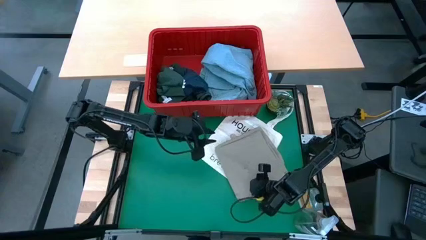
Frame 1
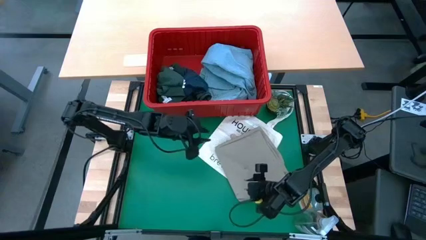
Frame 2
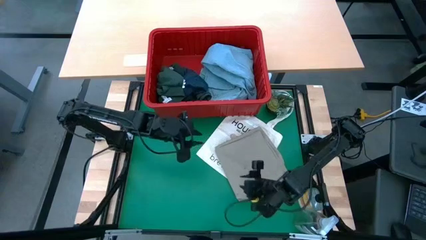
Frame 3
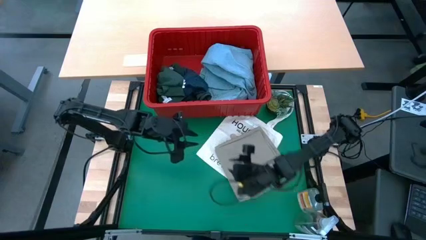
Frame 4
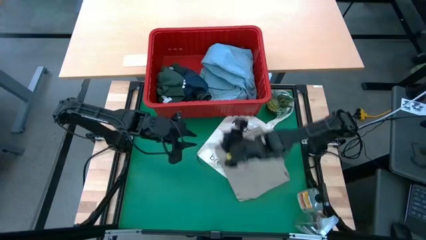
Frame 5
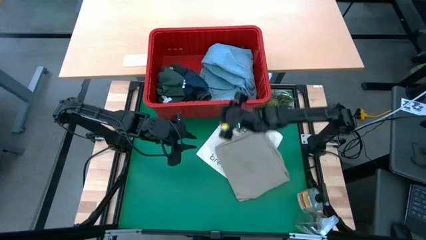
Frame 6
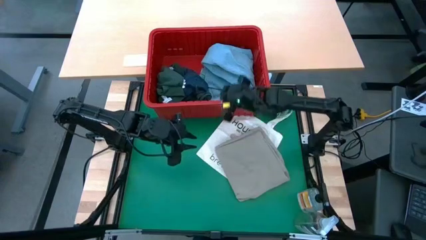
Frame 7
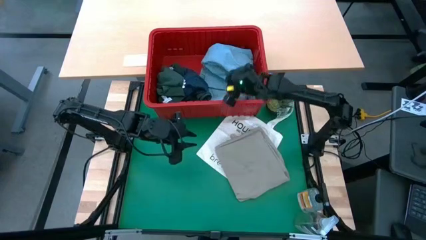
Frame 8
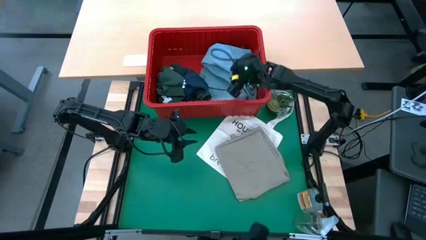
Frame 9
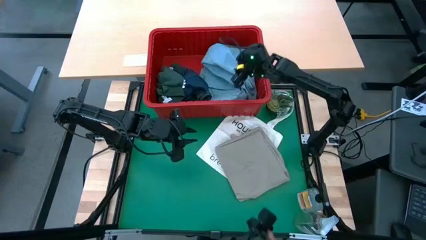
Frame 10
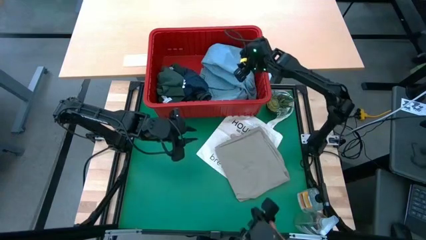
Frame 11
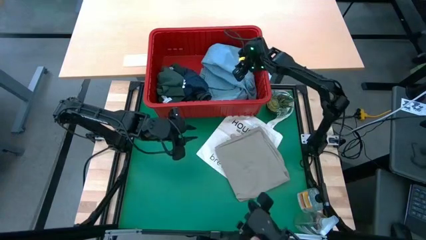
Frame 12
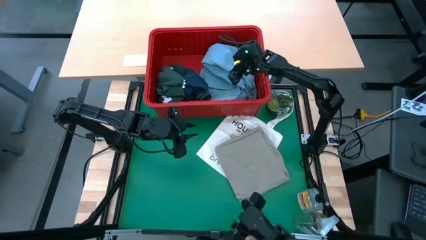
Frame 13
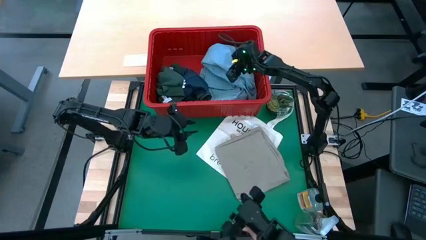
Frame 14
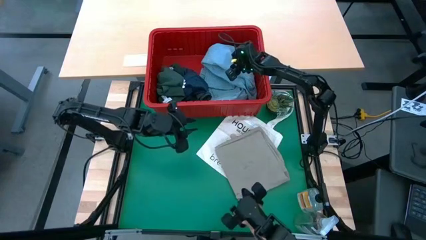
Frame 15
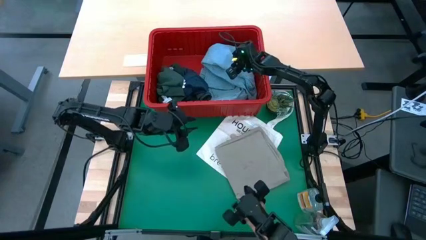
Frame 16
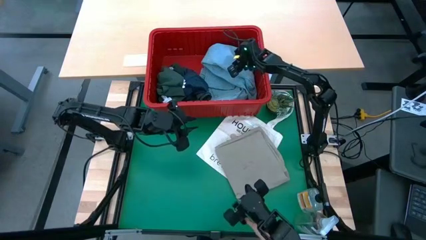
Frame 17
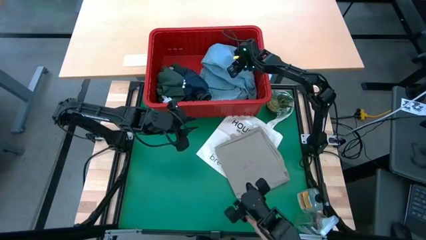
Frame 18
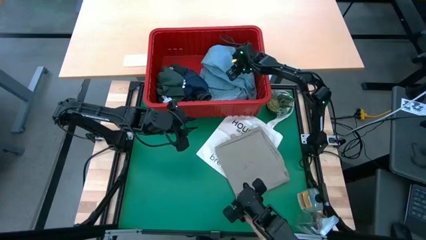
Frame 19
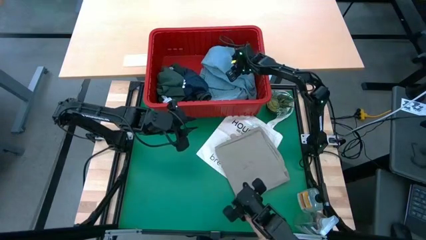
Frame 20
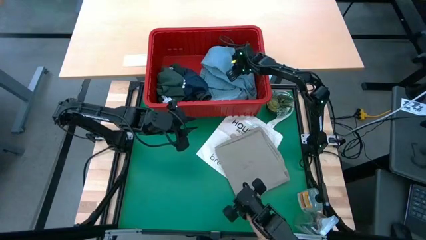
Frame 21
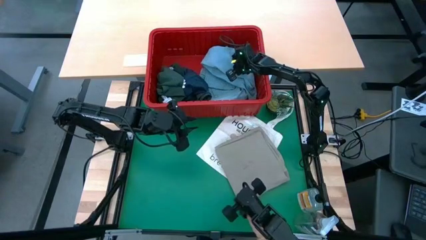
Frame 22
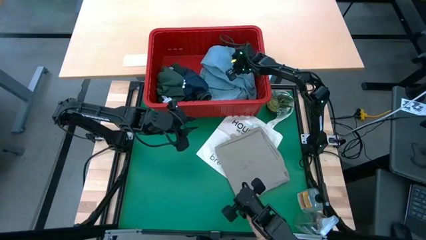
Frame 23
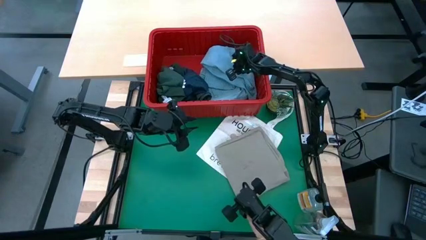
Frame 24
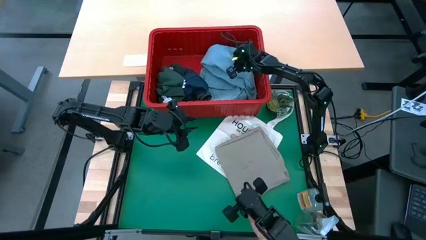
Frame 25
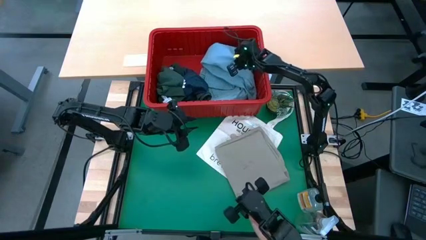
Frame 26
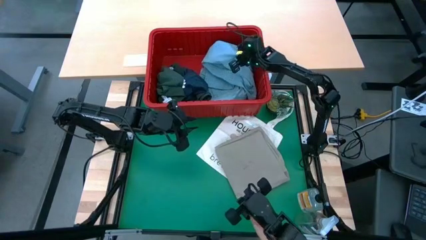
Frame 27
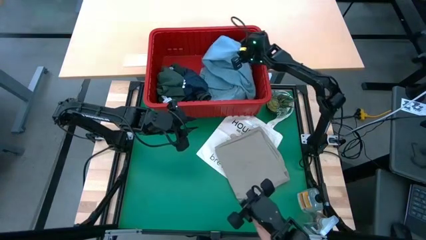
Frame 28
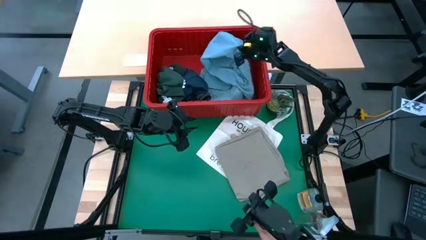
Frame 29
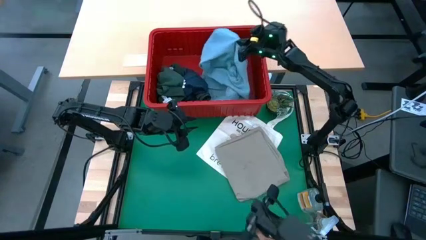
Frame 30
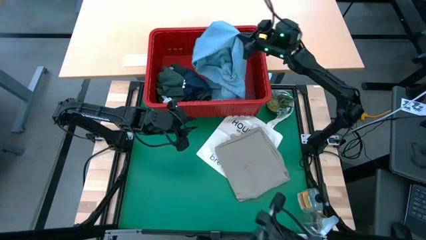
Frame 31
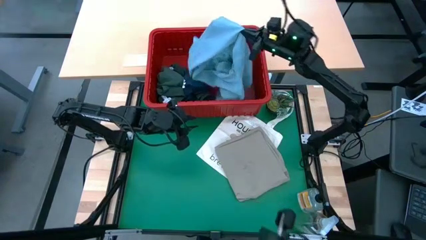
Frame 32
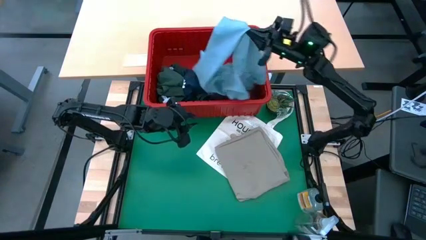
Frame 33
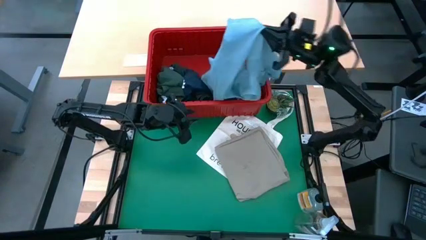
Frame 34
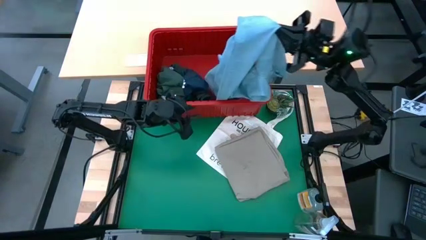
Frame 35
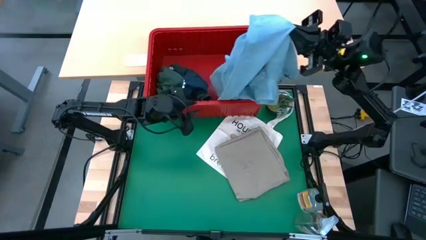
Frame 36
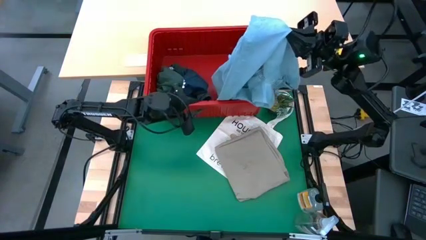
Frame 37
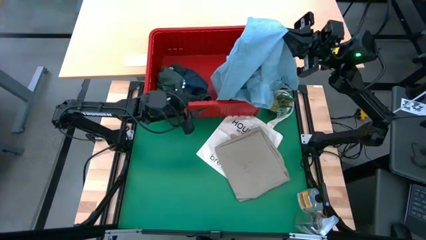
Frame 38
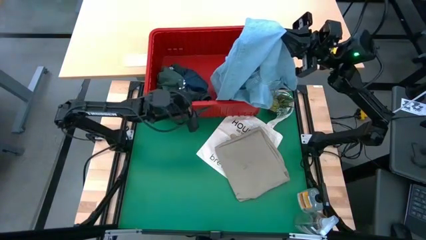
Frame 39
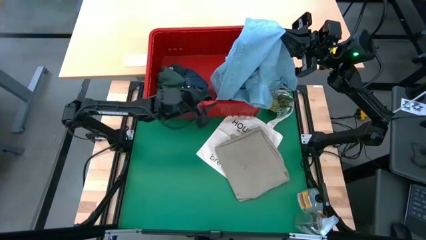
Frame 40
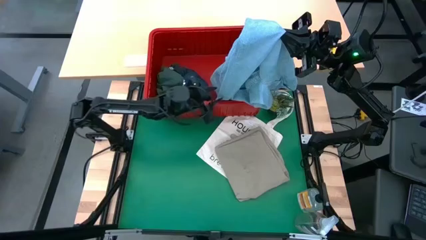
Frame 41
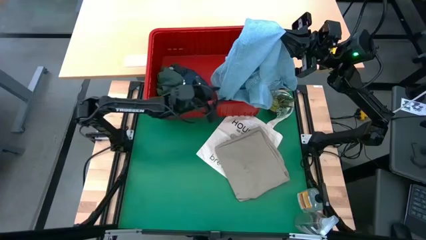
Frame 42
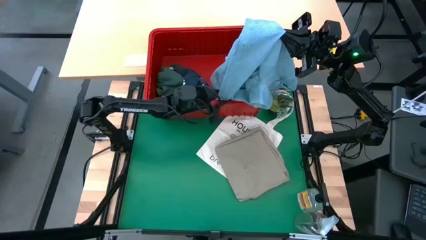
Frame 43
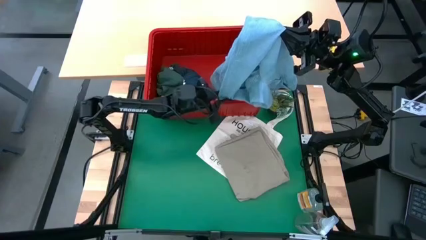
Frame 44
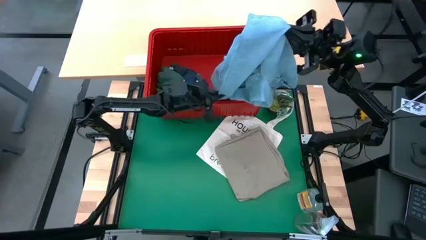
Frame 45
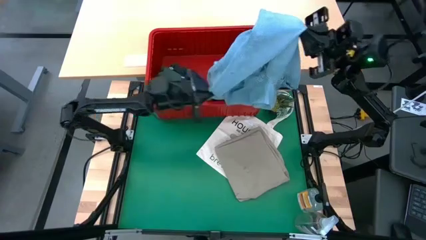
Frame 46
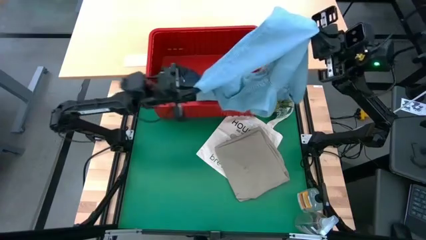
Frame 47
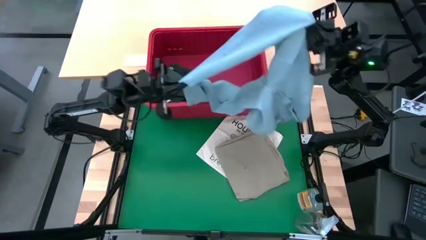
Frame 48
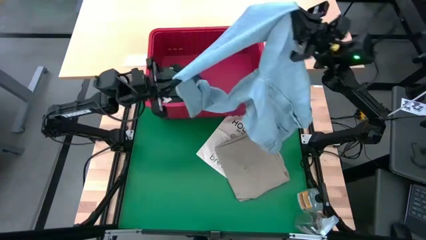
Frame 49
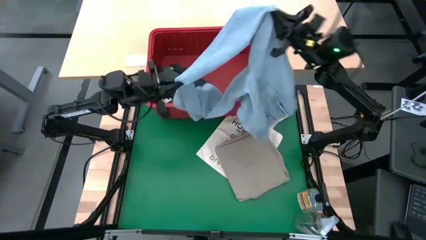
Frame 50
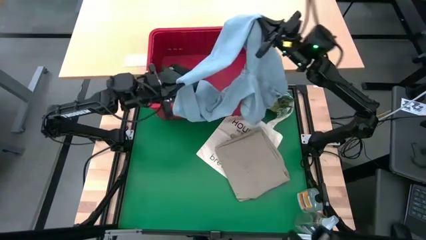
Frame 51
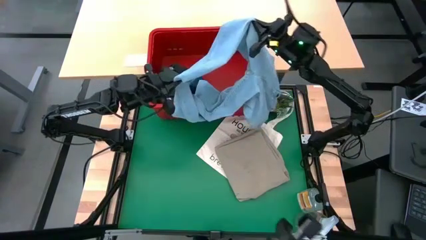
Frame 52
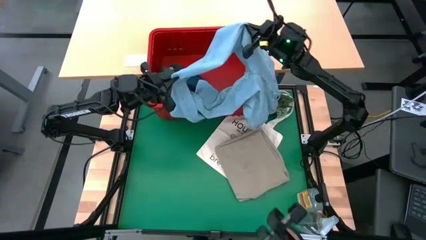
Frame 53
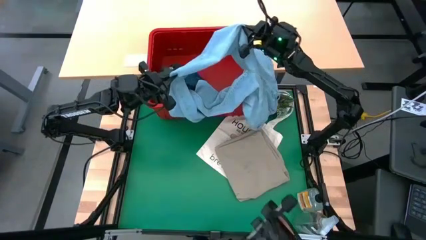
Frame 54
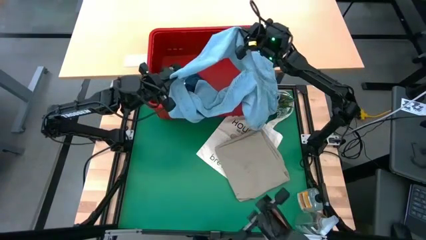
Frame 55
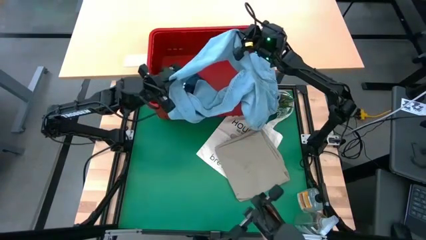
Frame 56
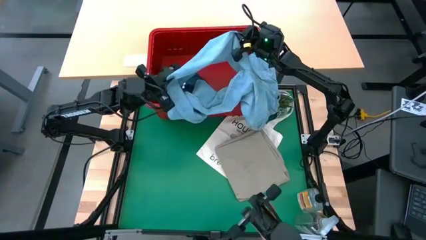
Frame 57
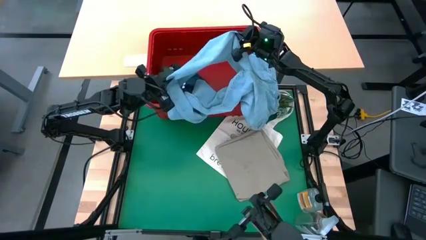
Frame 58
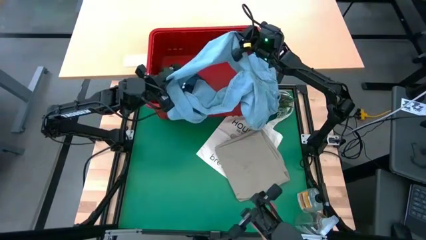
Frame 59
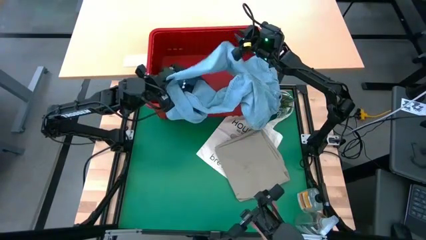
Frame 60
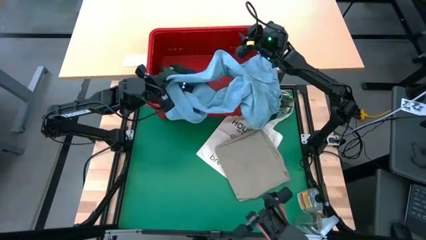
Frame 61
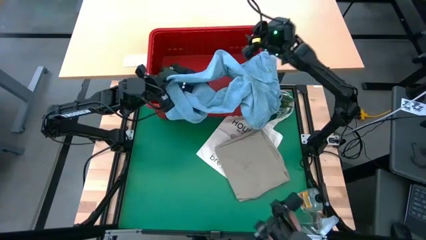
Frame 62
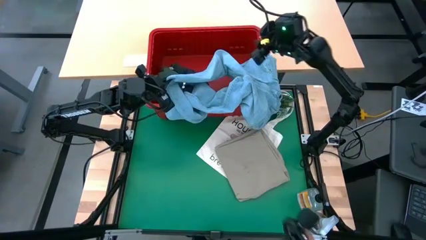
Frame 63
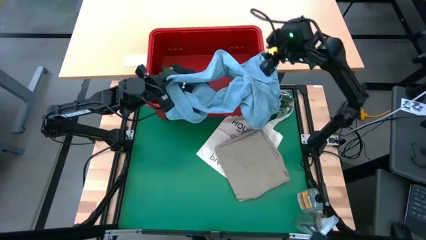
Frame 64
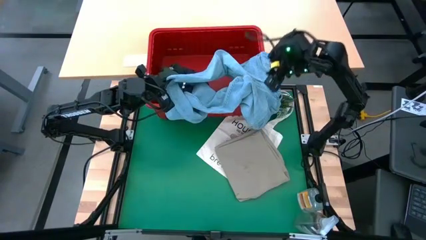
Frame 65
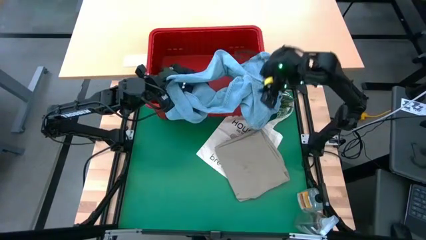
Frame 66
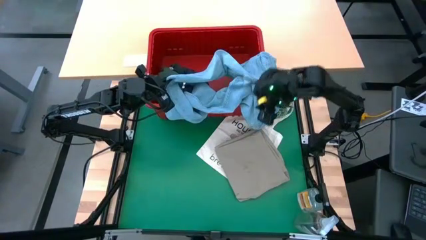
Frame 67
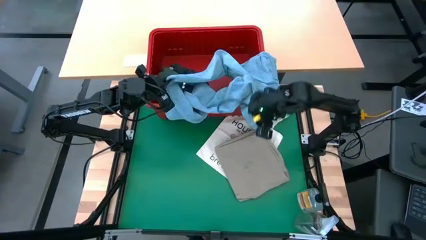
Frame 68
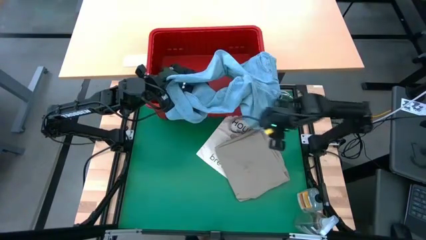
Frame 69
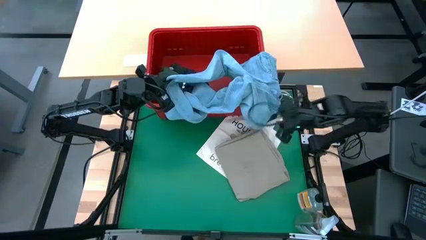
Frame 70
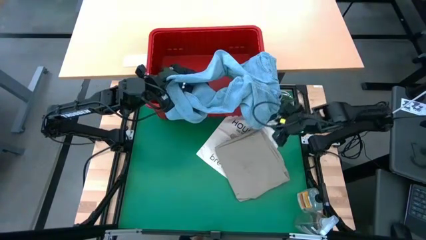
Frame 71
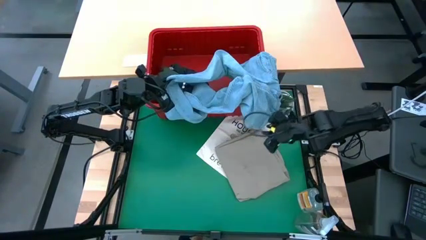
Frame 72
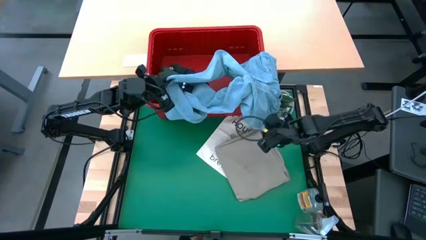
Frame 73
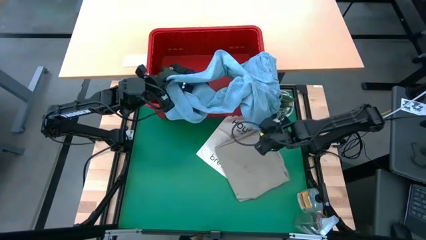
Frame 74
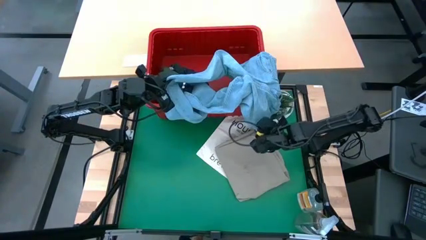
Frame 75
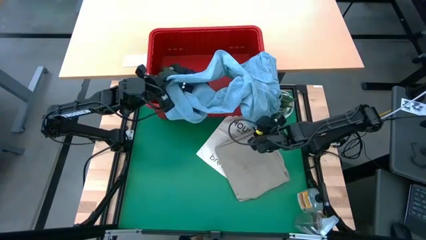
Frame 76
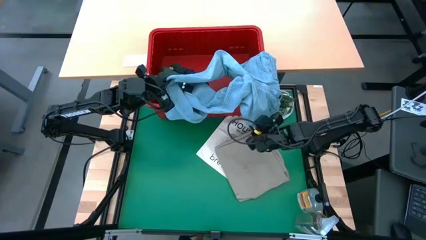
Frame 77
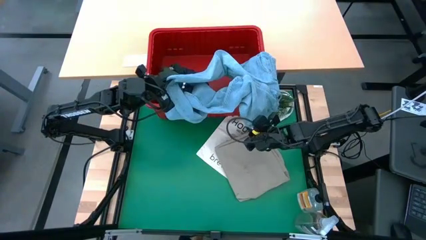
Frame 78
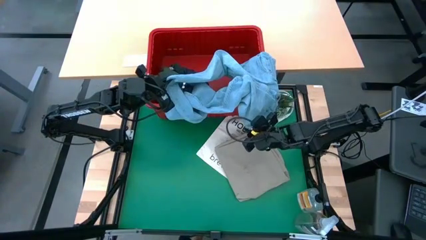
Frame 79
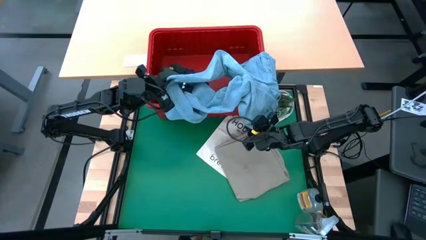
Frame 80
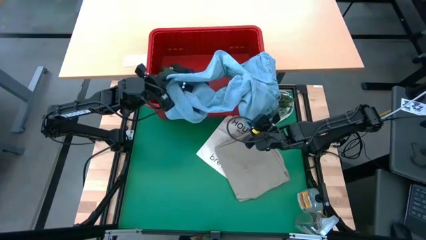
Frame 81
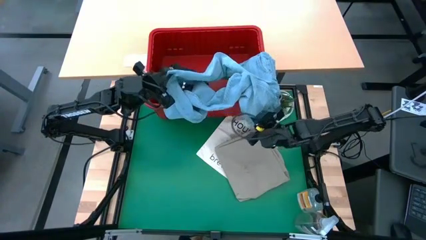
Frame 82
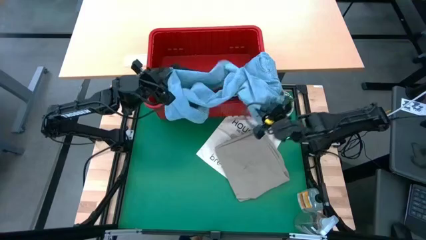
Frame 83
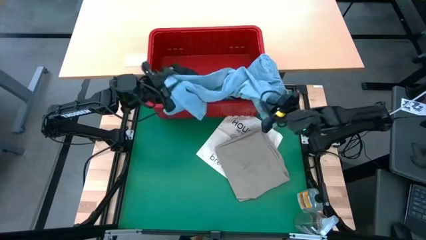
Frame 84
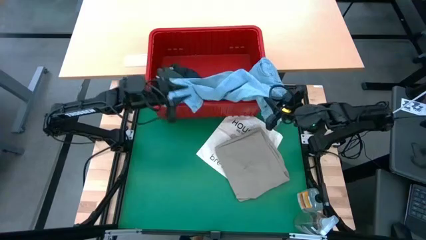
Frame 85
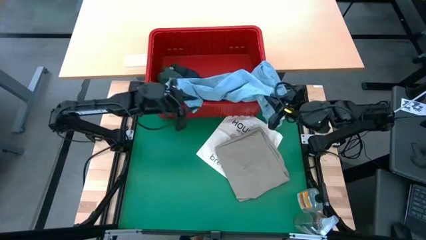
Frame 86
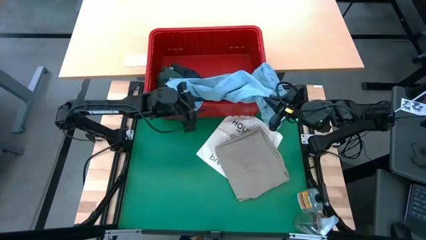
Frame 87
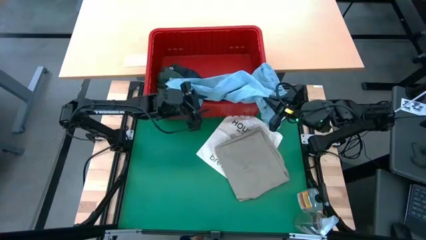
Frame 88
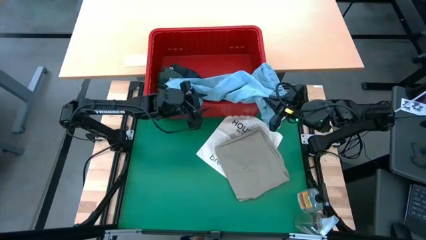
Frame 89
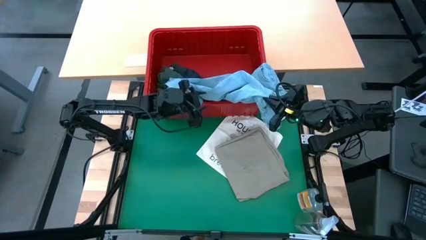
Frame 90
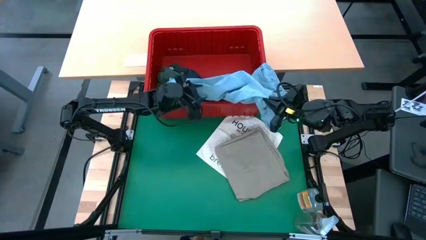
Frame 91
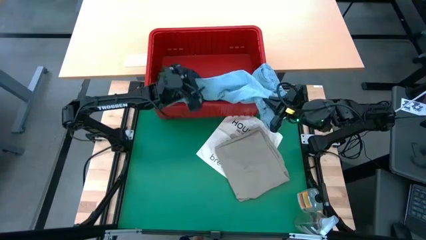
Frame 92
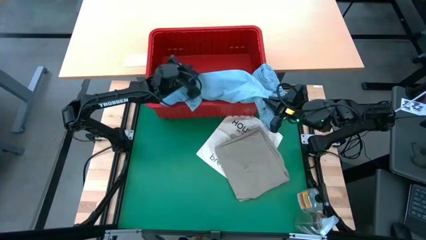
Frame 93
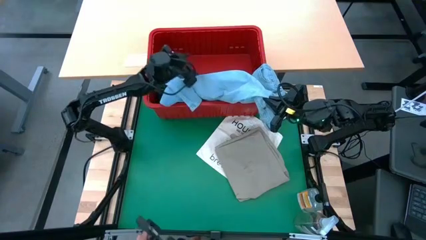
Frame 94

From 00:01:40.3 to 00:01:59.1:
Task: Fold Laundry from Bin
Fold the light blue jeans
